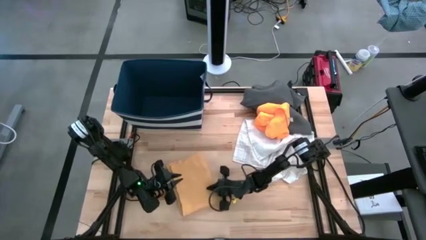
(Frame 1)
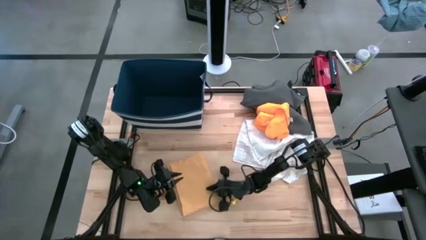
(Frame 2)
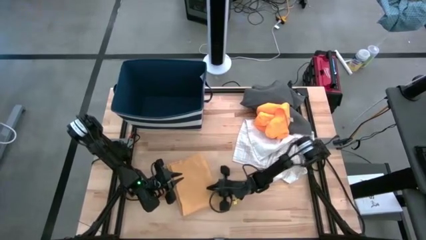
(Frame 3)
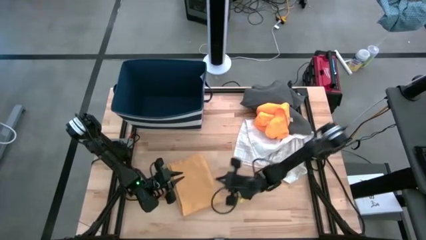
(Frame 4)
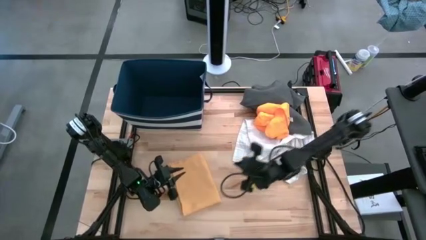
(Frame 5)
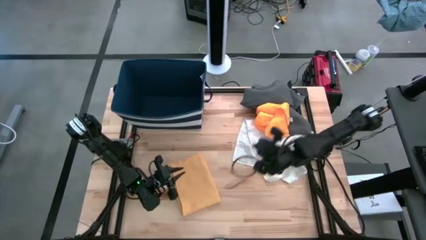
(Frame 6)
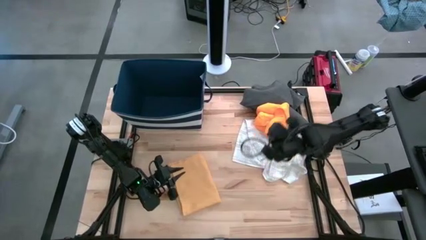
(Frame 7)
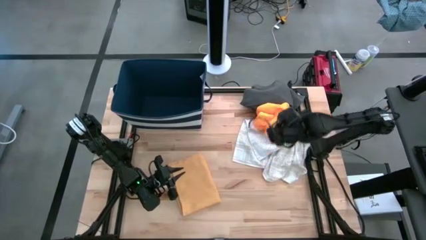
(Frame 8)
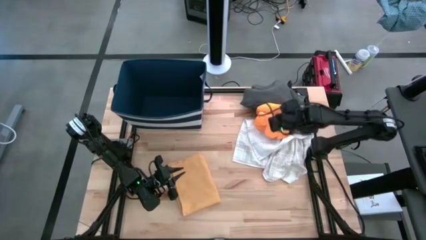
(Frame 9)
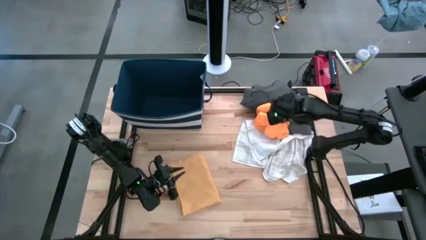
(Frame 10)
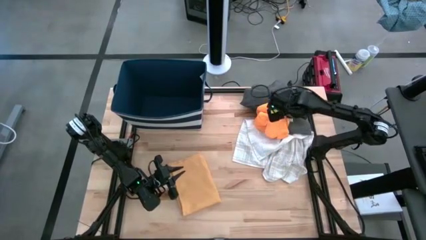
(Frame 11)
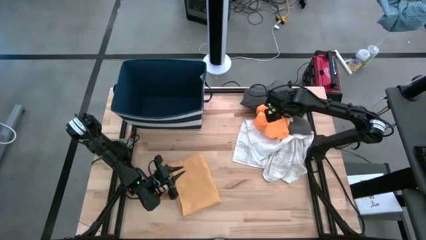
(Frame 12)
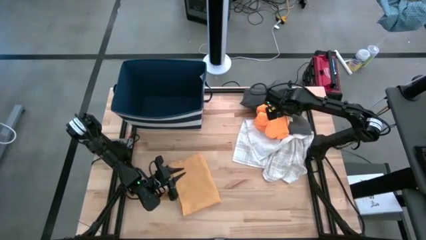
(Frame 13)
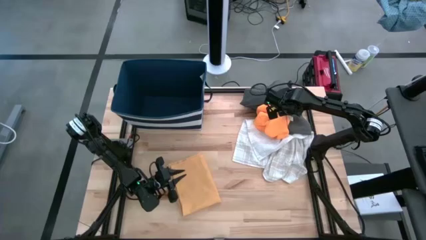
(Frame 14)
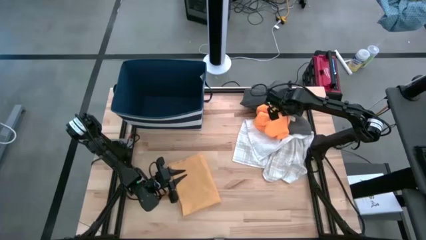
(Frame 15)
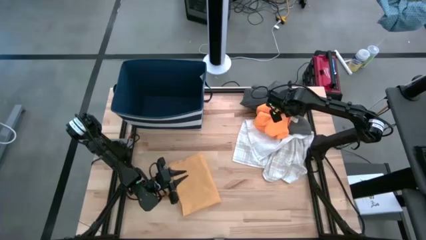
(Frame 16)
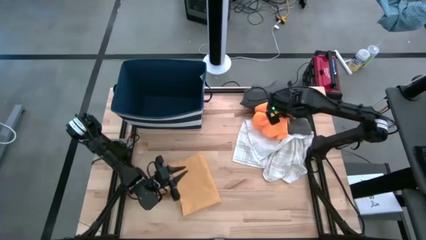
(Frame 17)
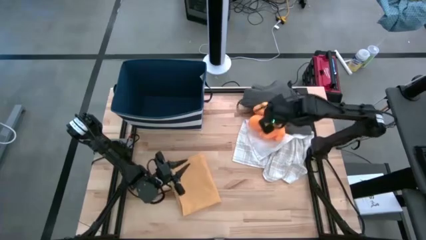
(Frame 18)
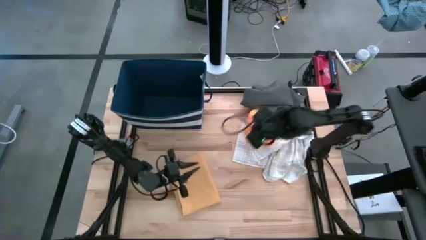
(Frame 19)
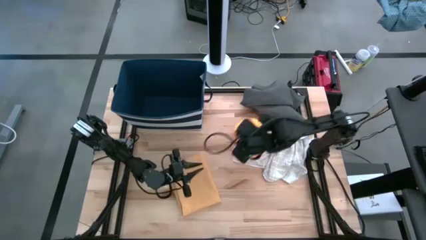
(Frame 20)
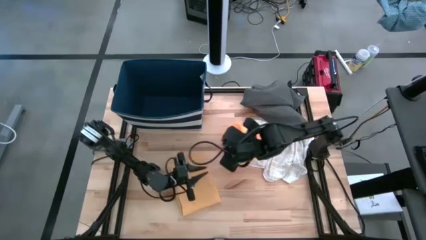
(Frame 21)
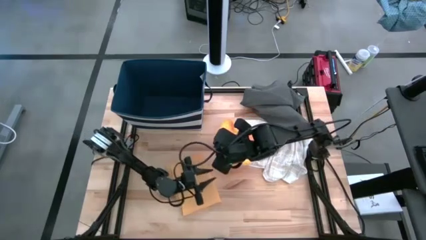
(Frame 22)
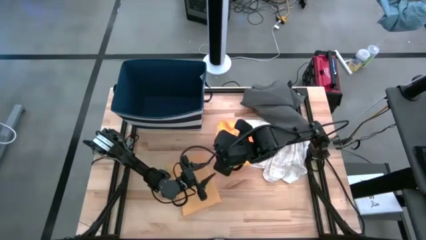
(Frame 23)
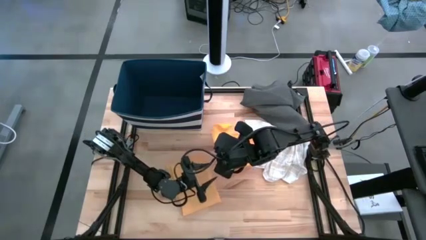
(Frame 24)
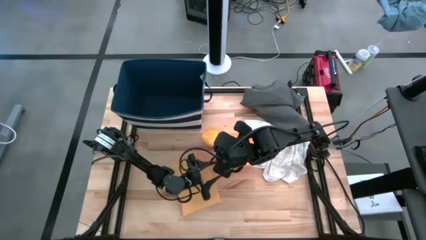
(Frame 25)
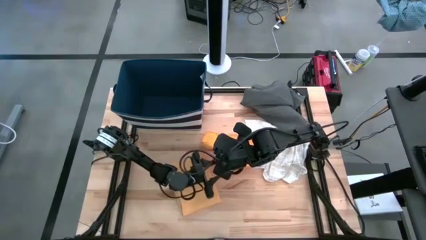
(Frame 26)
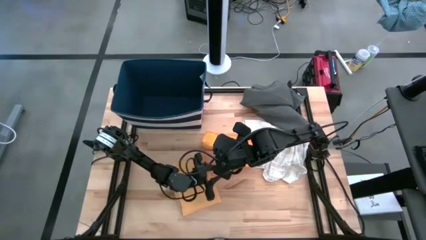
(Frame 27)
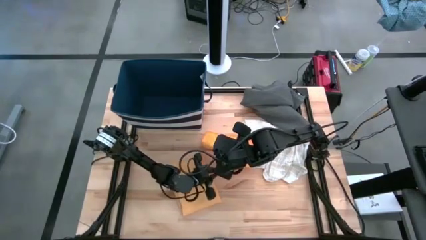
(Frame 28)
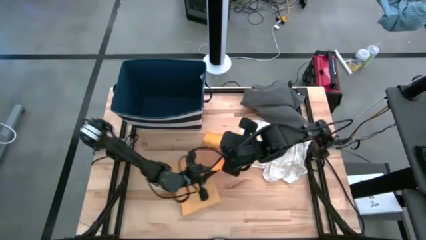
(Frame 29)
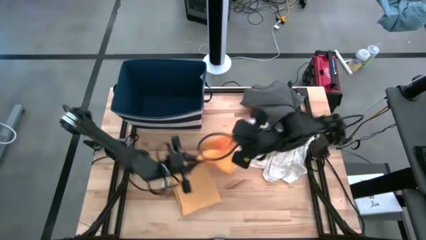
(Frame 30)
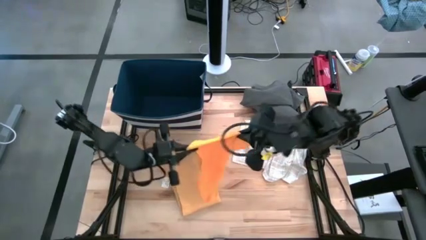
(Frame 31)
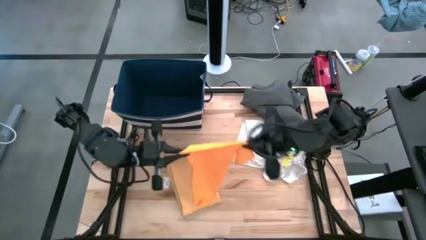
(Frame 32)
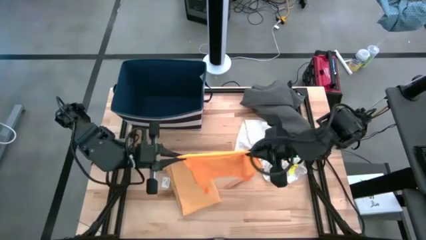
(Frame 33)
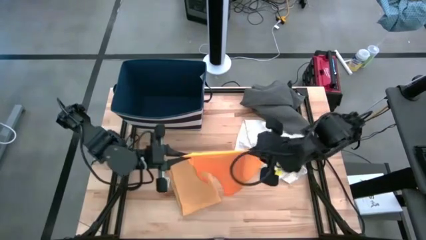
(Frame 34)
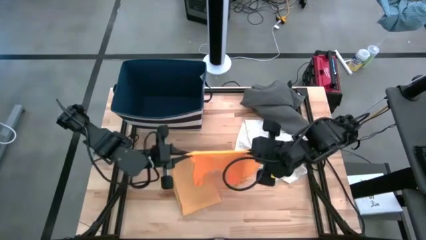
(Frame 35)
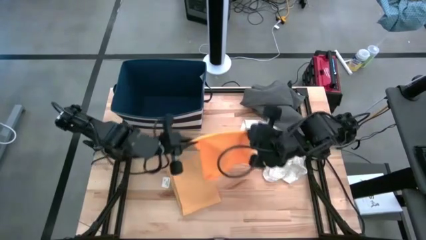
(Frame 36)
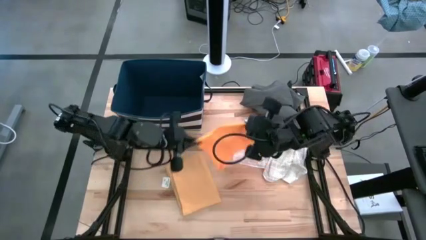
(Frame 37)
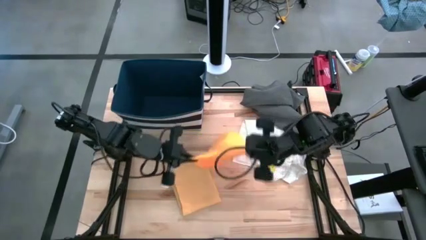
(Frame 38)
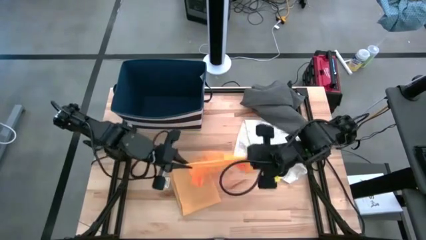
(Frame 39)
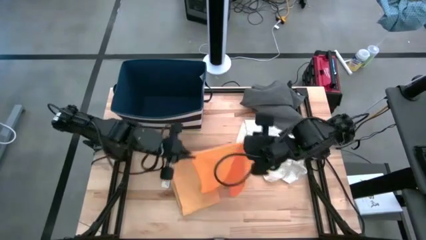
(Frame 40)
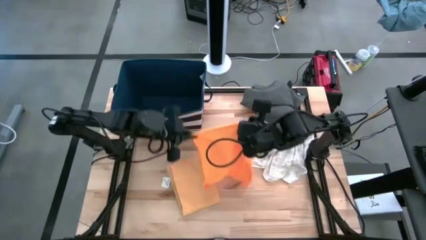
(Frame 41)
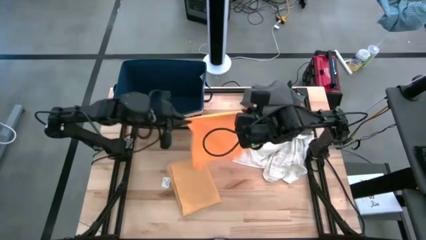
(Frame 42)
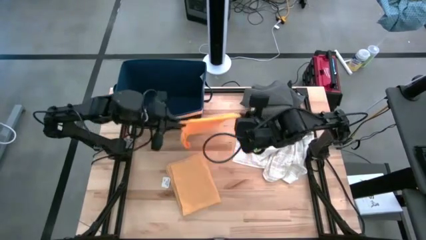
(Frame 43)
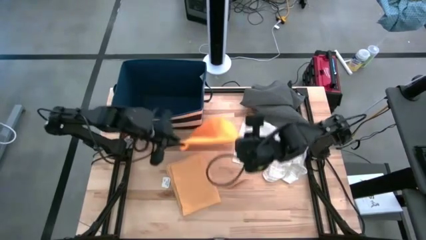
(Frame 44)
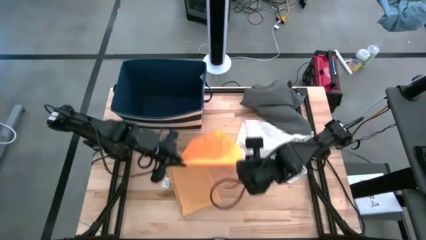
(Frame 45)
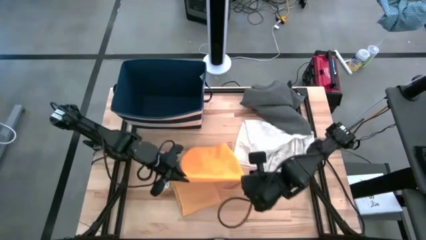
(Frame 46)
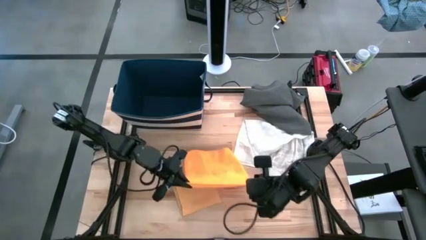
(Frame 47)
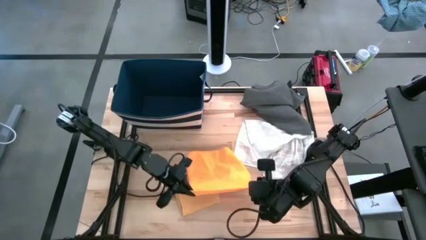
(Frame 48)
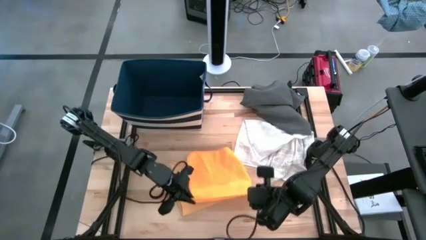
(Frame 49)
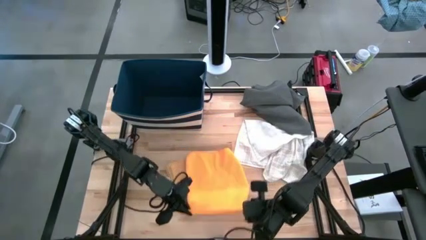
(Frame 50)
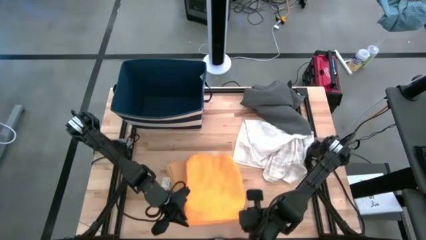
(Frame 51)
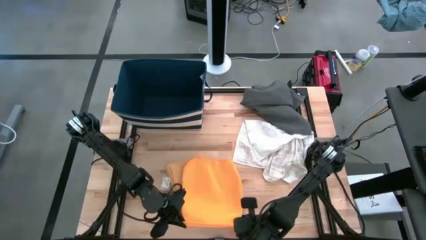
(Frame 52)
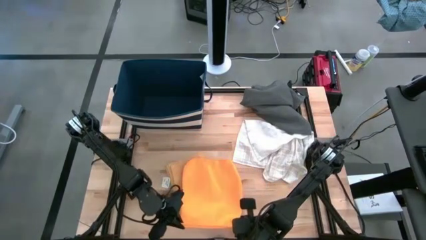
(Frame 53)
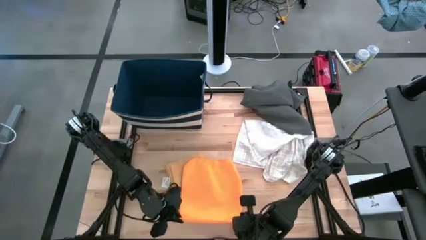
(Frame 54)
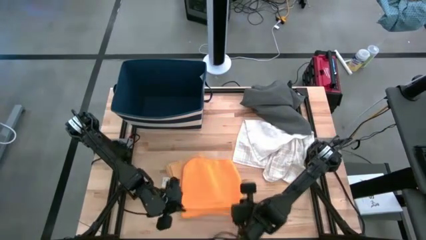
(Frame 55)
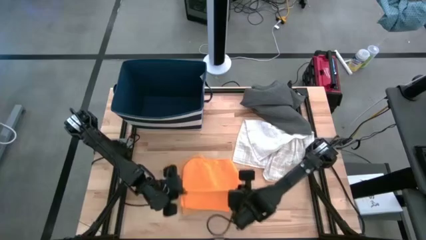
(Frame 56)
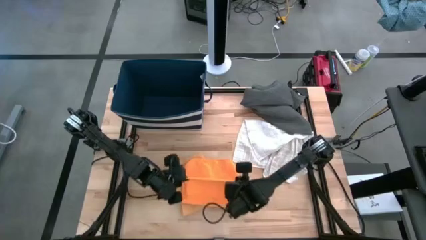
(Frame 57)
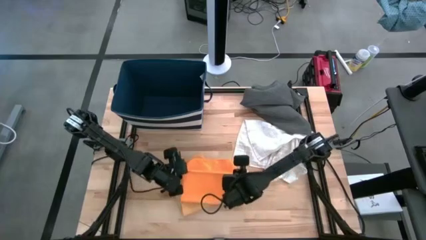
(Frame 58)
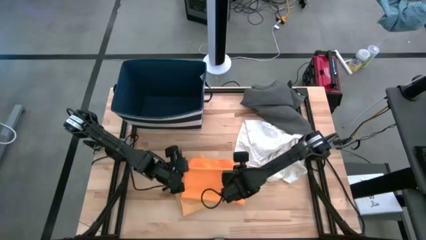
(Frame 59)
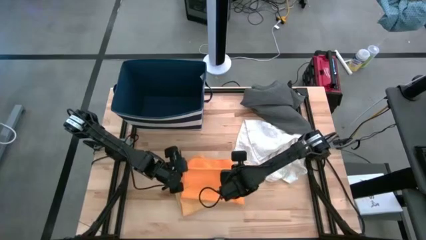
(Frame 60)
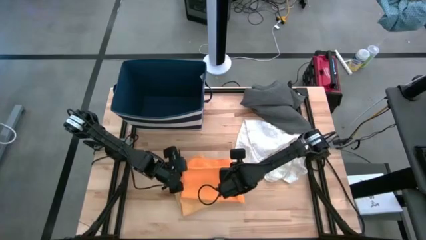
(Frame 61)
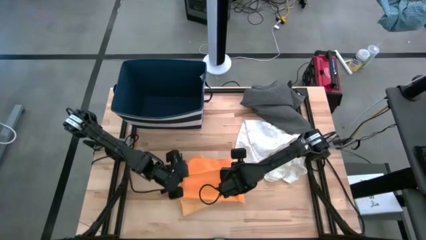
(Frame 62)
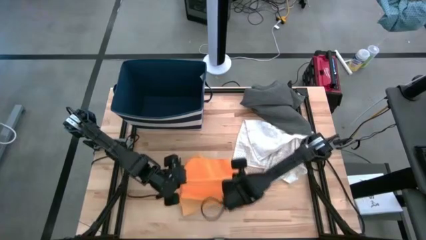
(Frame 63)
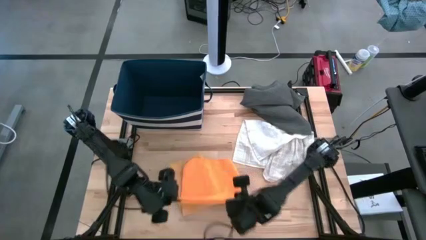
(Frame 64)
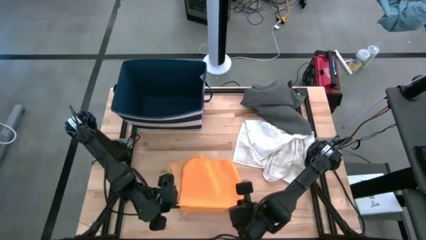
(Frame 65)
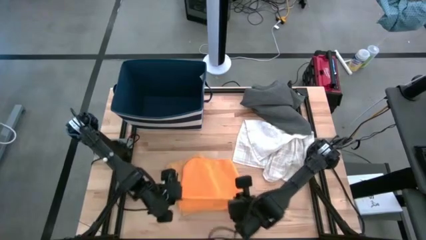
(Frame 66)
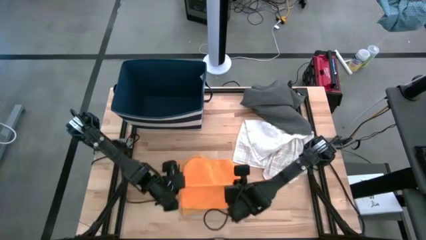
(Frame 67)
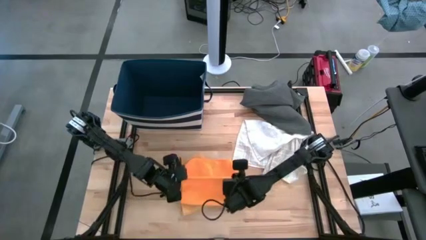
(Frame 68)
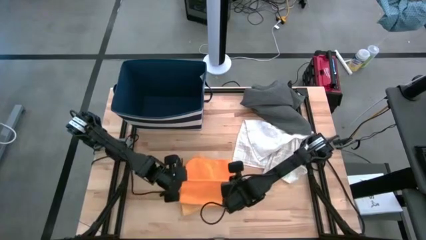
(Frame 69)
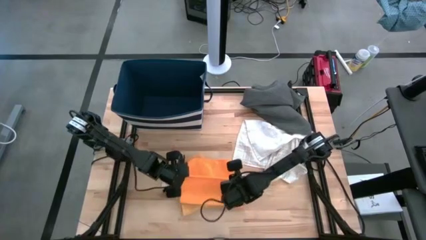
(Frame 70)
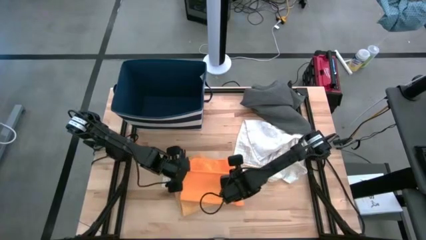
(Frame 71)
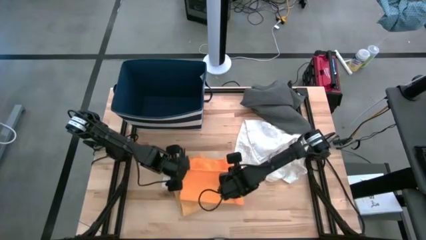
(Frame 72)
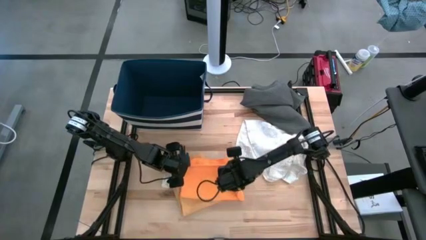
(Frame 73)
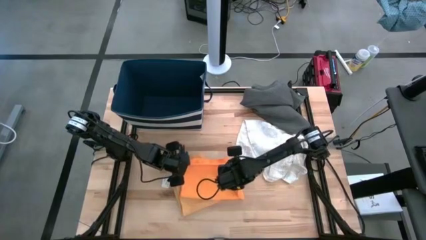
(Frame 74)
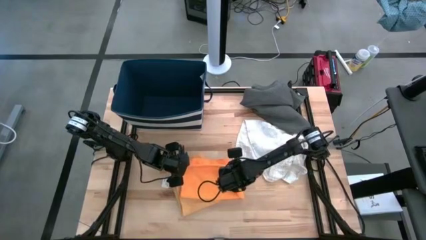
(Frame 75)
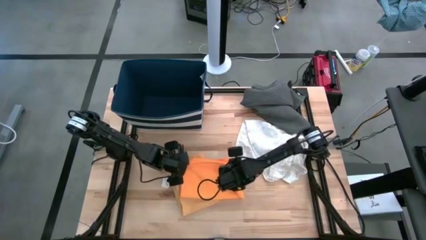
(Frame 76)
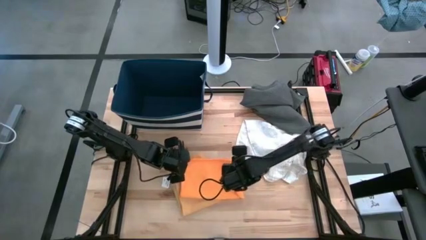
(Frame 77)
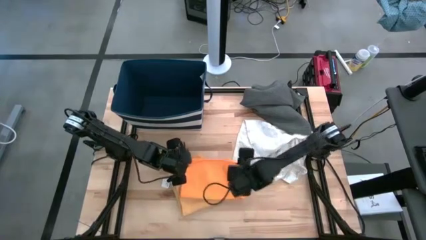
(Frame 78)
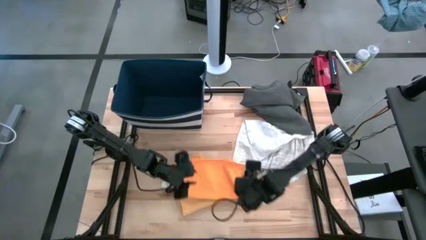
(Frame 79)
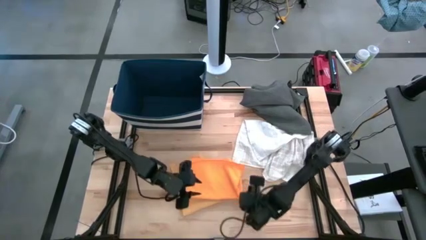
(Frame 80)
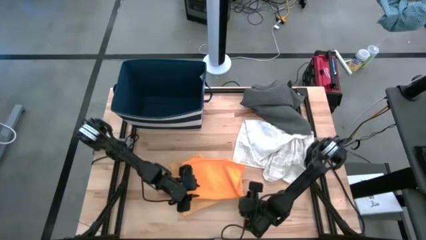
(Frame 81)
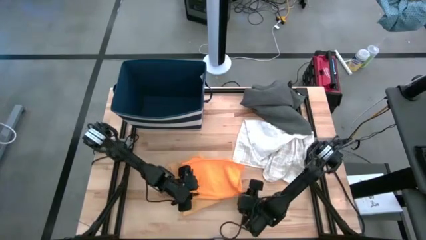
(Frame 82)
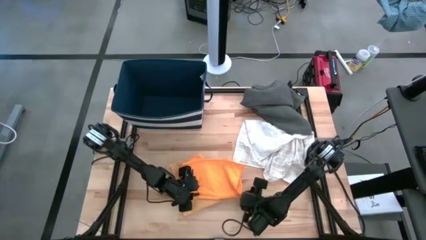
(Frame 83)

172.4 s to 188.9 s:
Task: Fold towel
Fold the orange kitchen towel

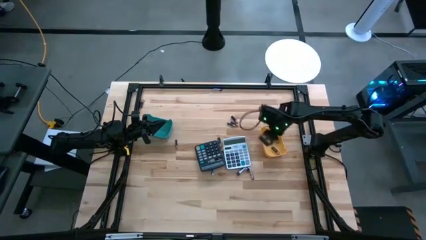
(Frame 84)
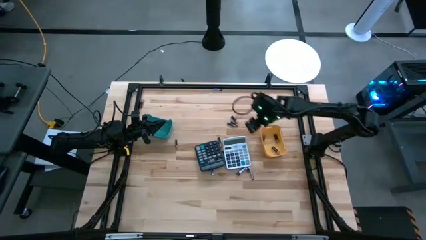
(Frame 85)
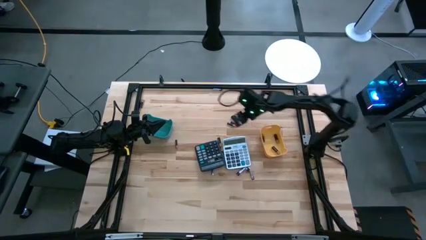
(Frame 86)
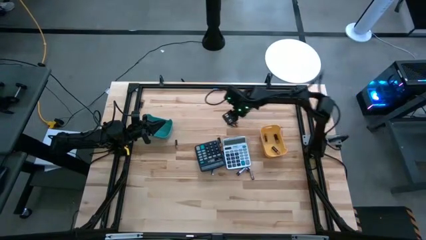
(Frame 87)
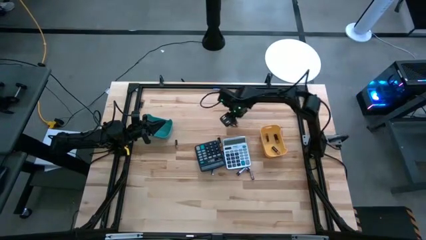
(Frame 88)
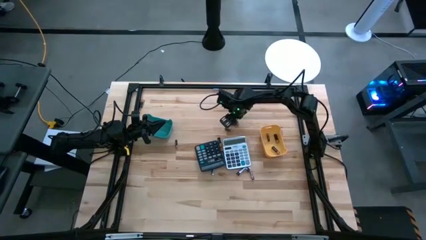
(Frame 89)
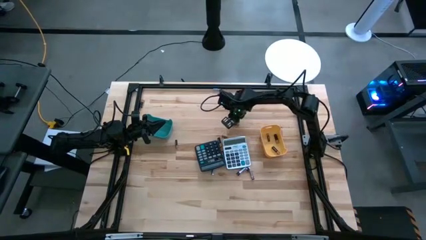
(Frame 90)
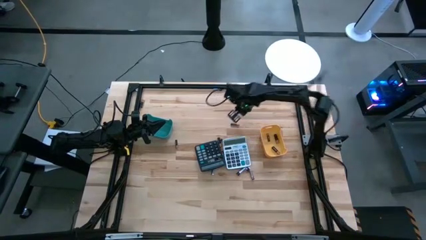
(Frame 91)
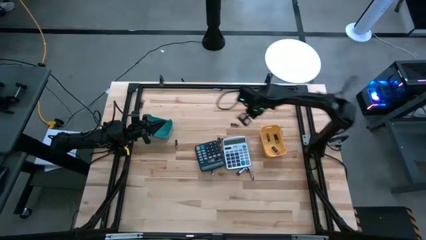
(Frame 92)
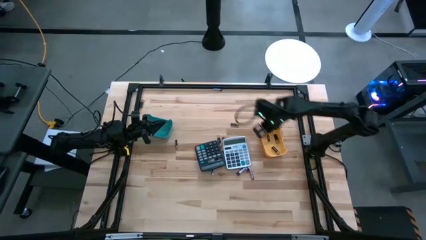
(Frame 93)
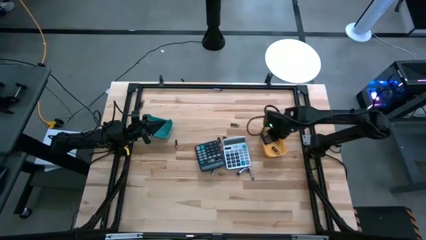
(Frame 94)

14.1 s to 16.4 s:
Task: Sort batteries
Put the black battery into the yellow bin
